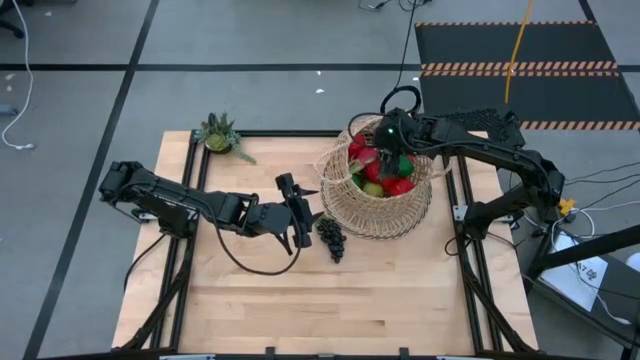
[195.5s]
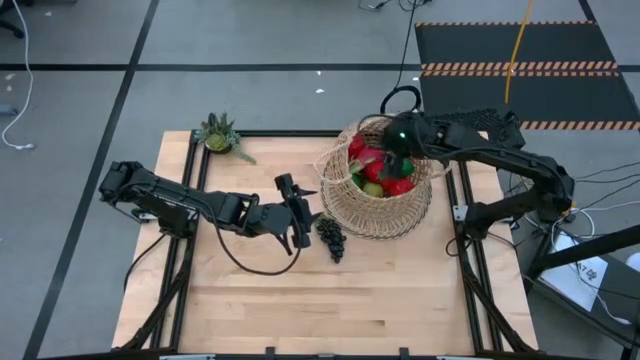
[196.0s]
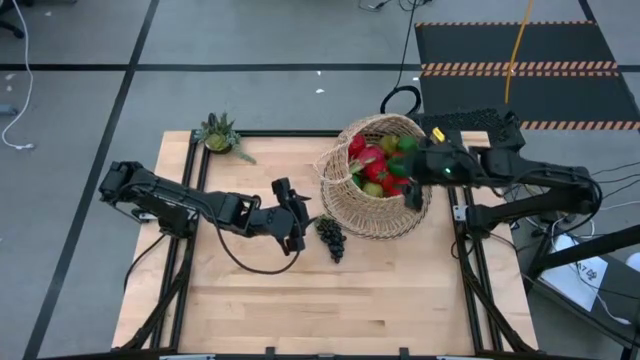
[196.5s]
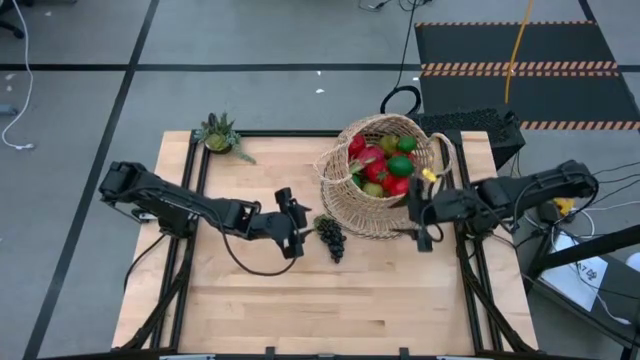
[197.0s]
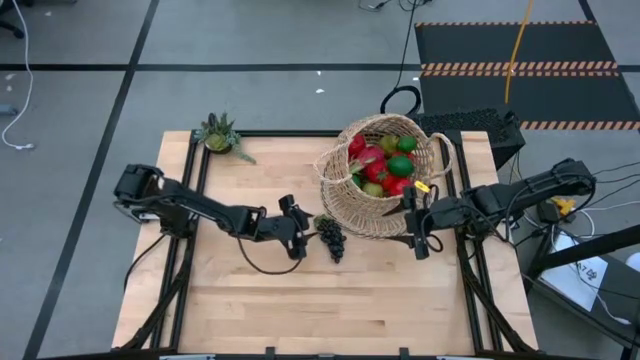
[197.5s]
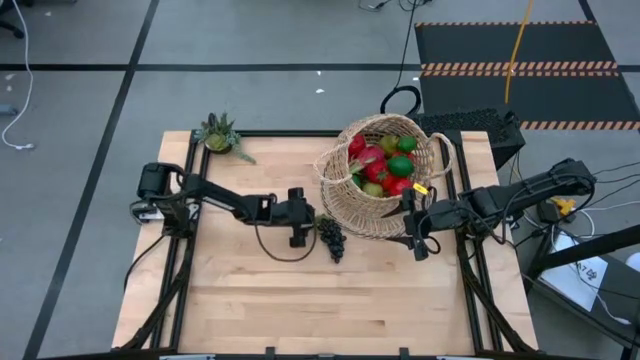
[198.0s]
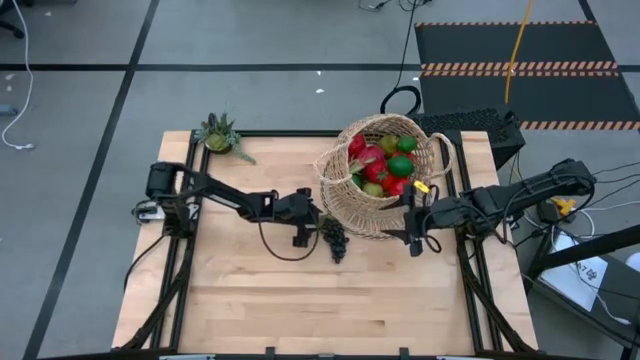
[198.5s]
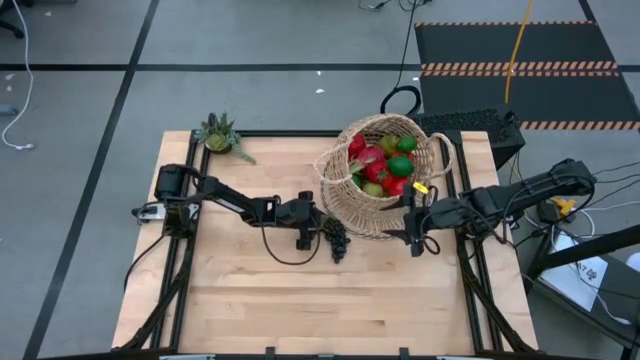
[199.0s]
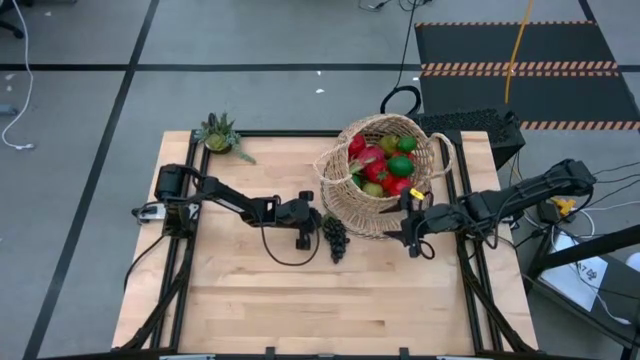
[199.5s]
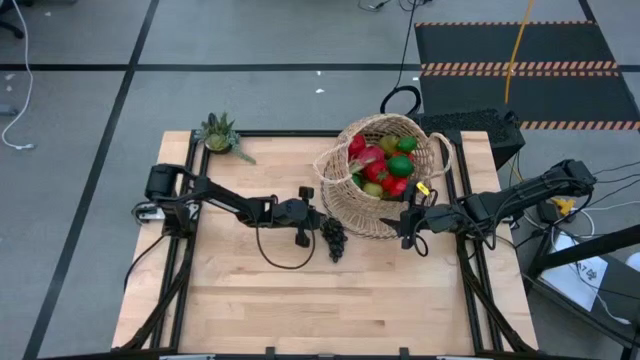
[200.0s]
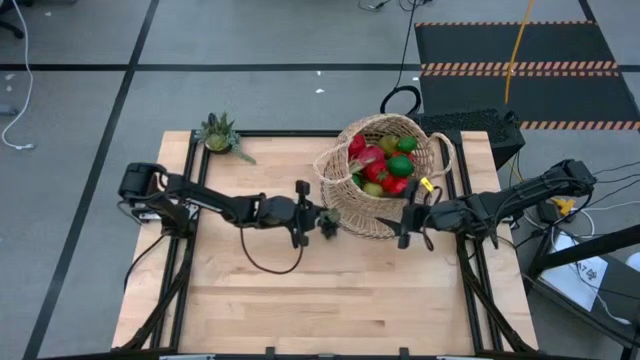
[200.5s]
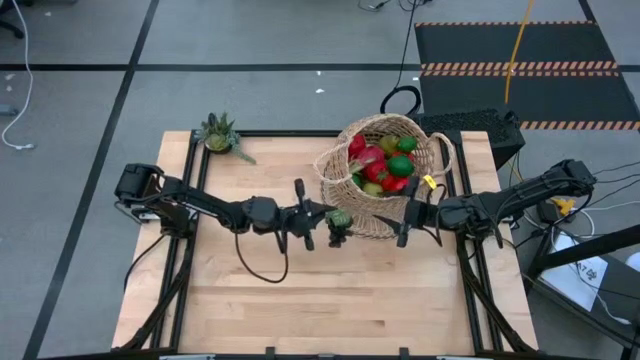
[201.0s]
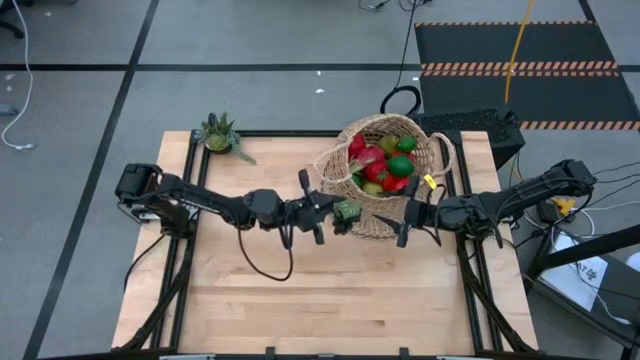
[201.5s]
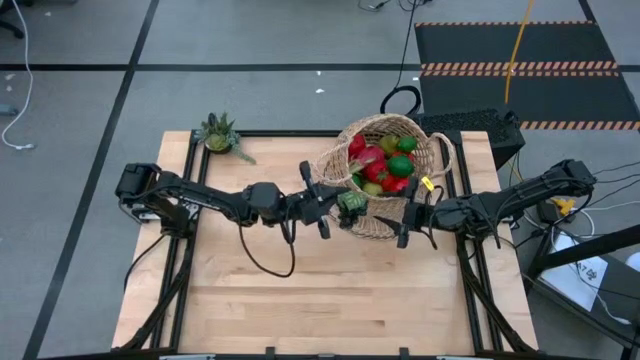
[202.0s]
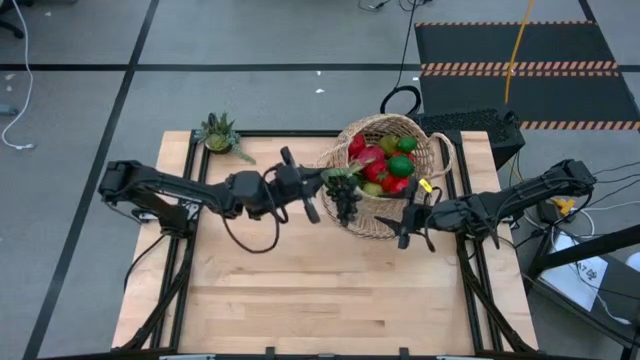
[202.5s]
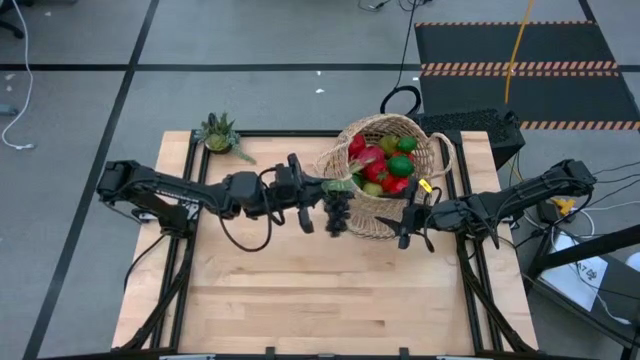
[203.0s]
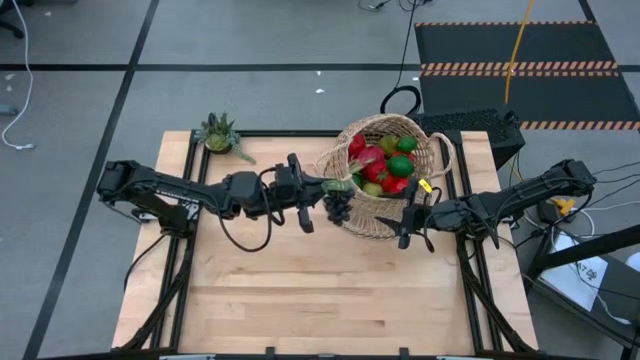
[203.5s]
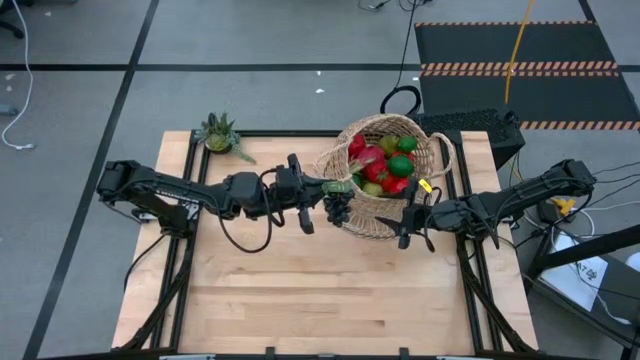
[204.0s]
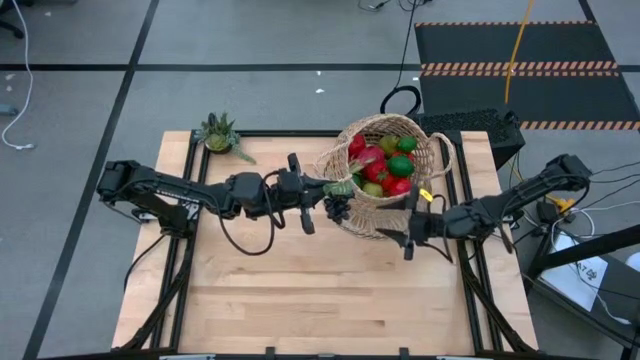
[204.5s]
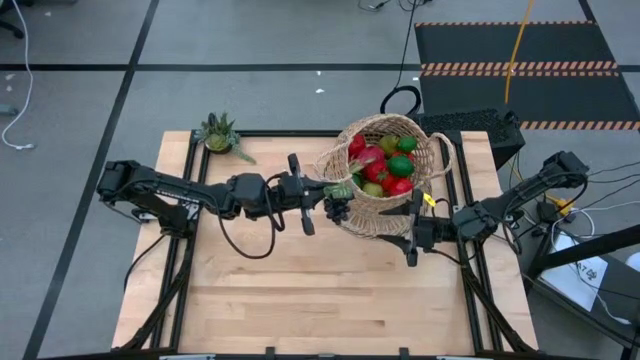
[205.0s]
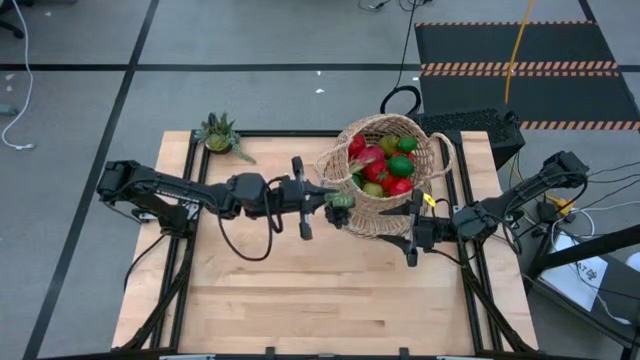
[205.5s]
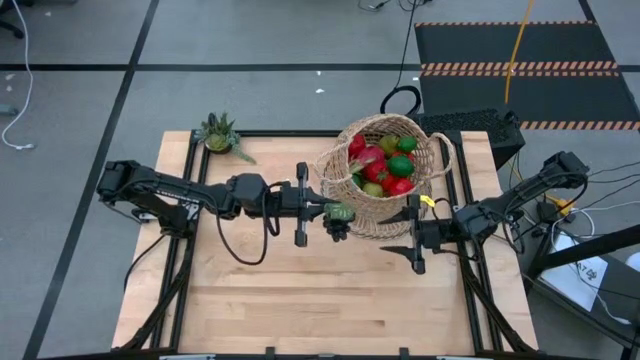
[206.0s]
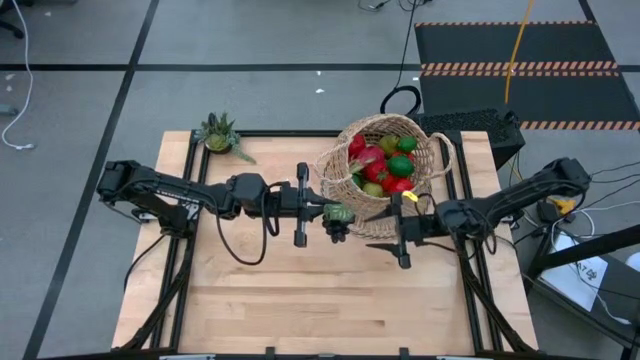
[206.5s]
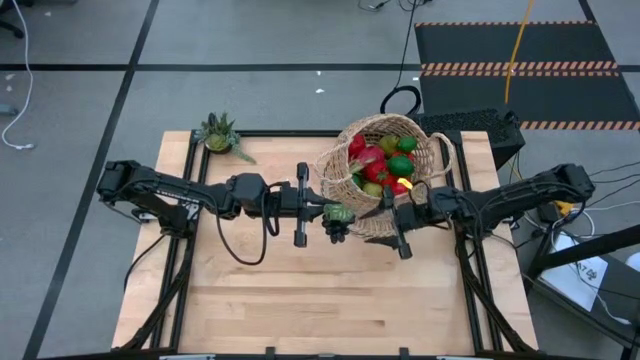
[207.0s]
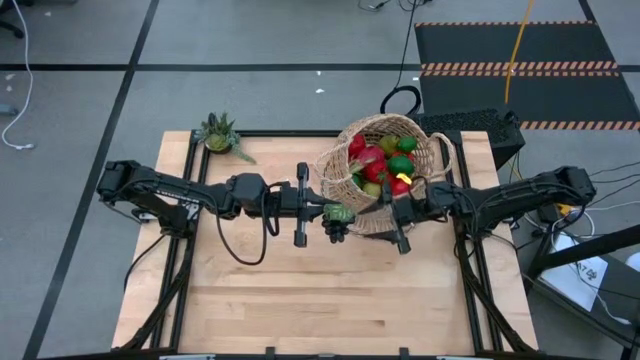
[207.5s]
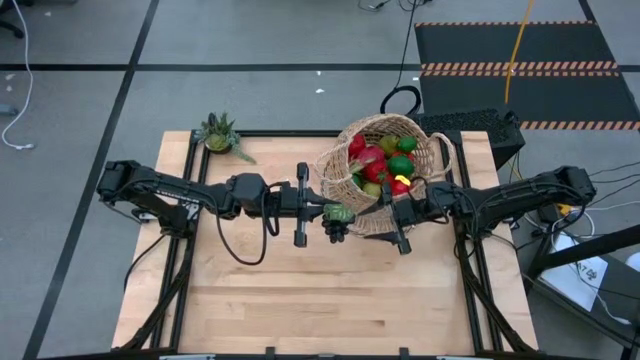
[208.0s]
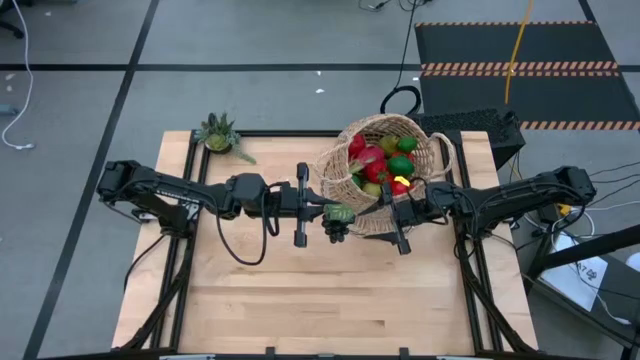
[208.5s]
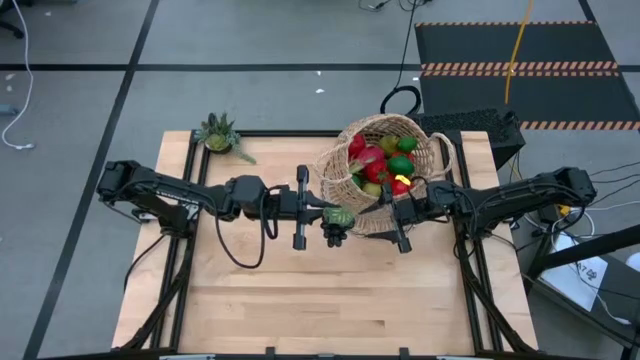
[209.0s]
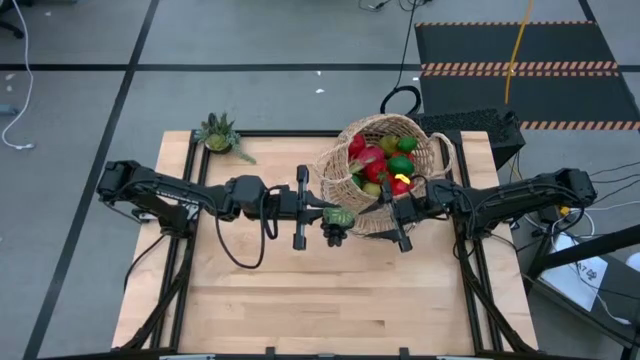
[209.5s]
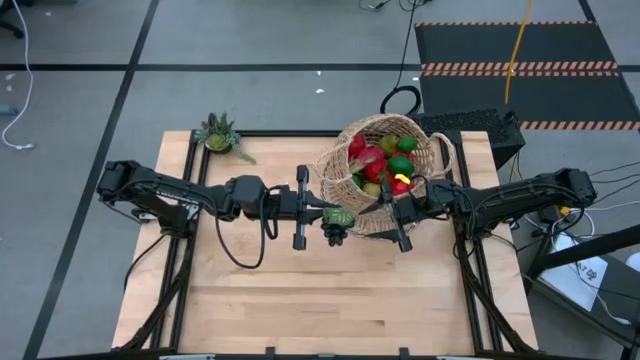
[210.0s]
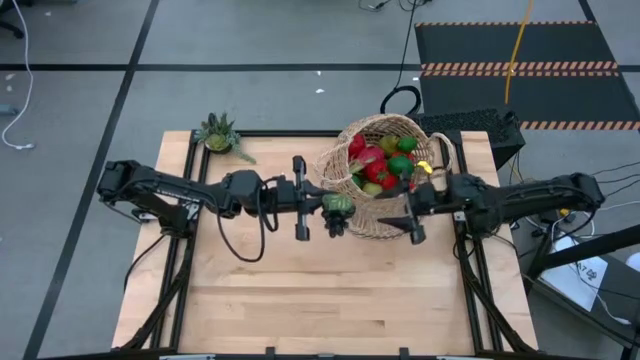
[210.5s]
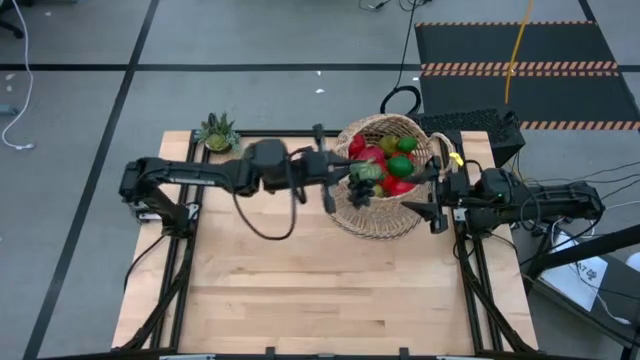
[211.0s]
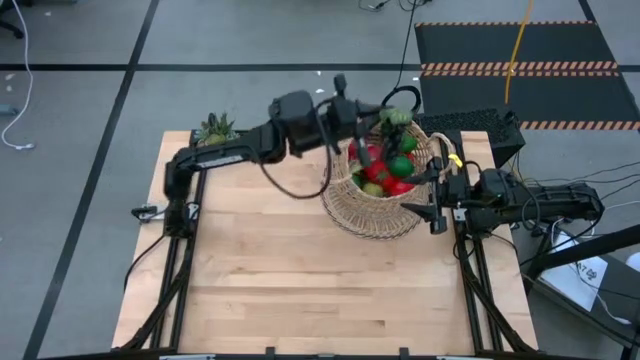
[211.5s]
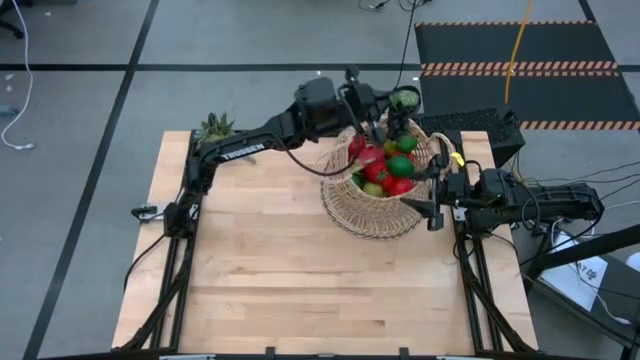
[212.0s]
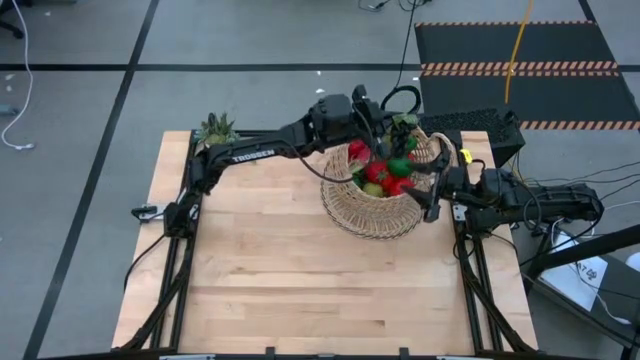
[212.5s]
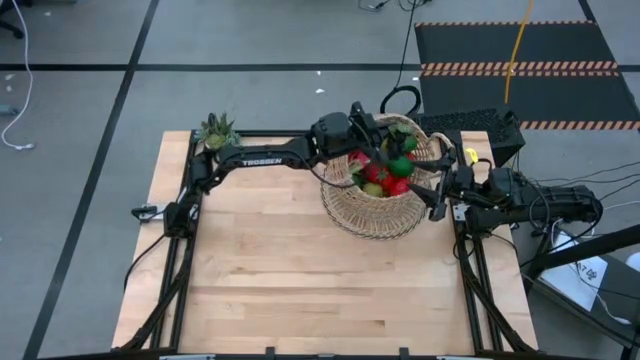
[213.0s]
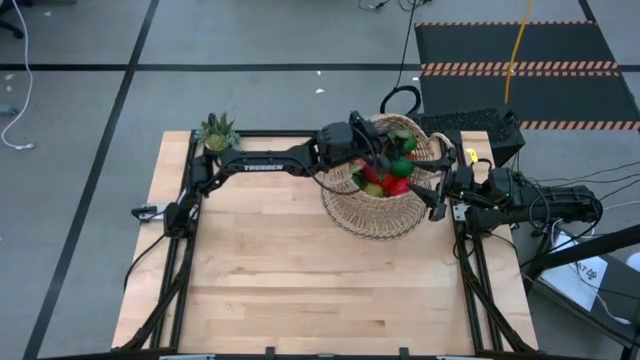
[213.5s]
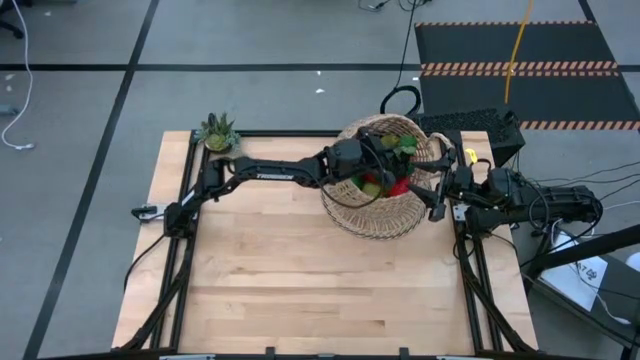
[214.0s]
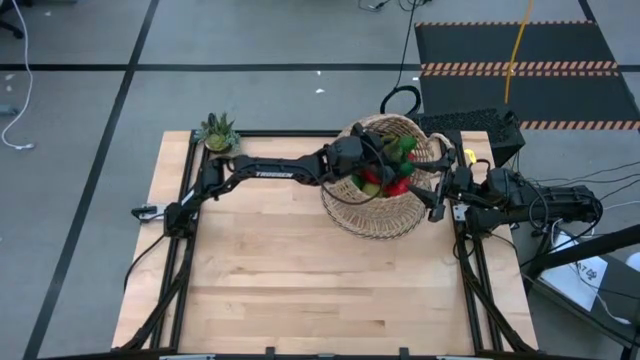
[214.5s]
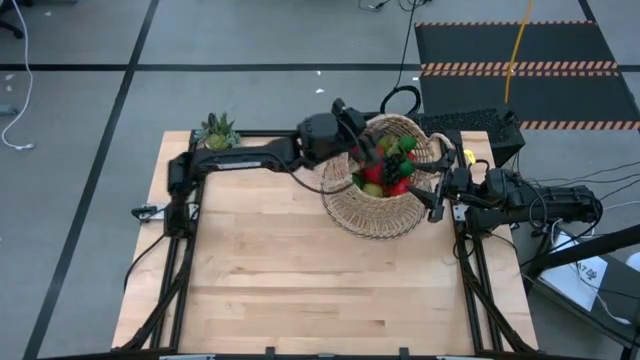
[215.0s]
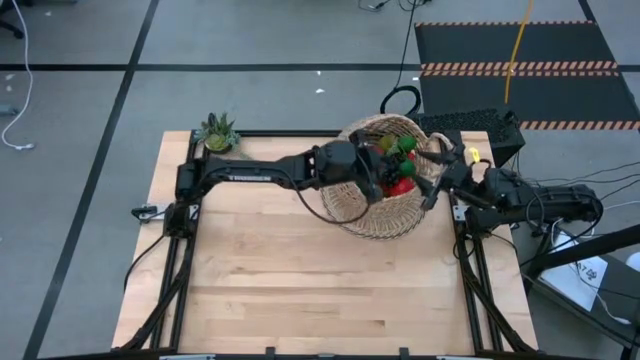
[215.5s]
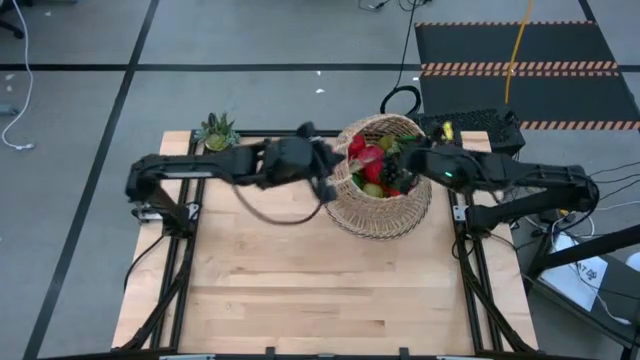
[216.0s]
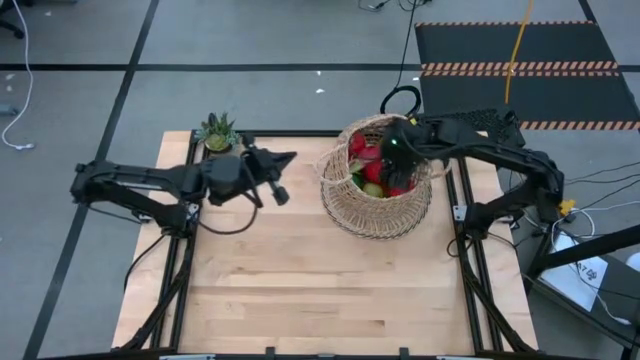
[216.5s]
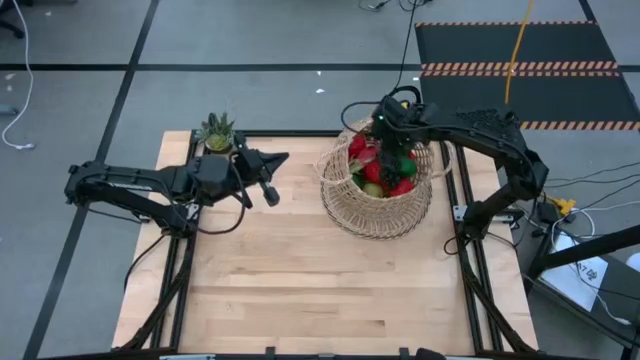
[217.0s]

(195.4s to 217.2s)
Task: Build produce basket
Put the black grapes into the brown basket
